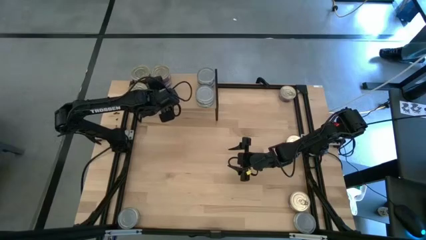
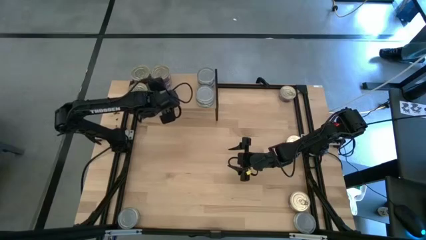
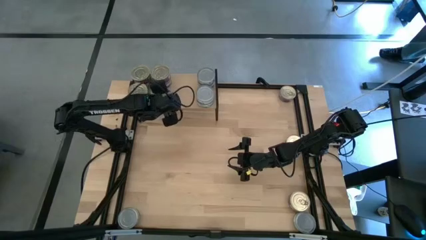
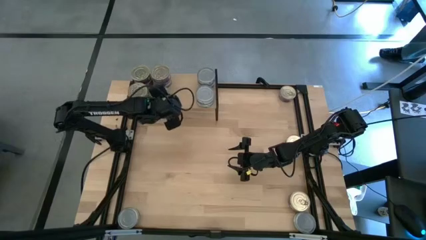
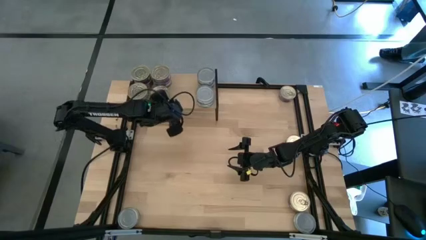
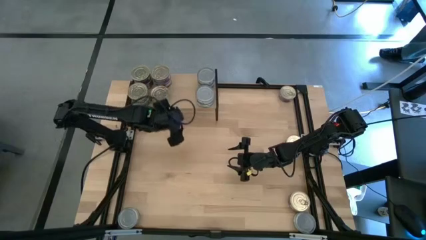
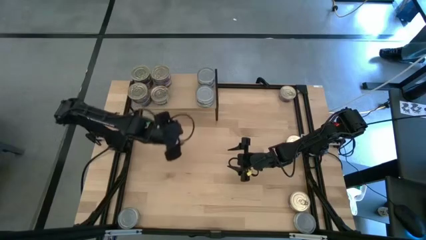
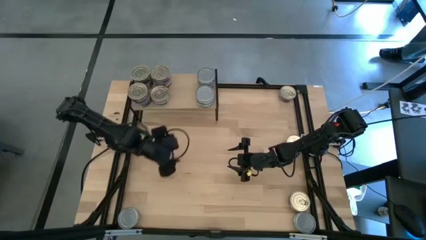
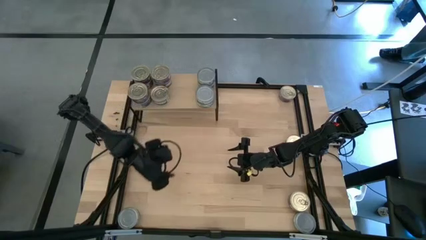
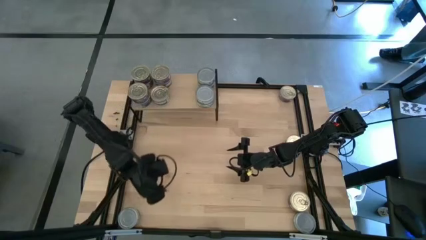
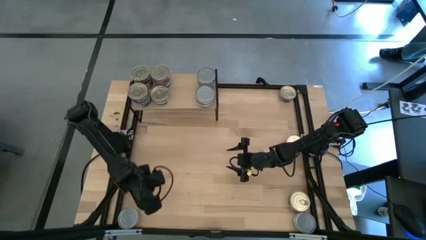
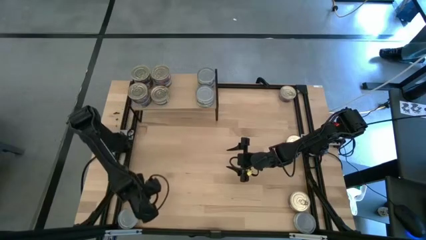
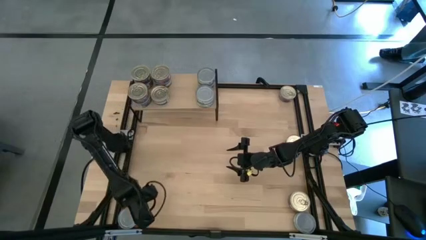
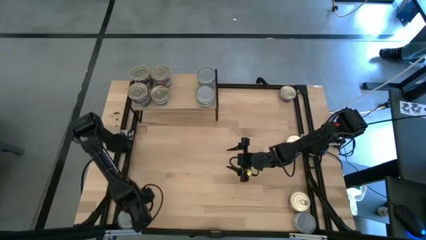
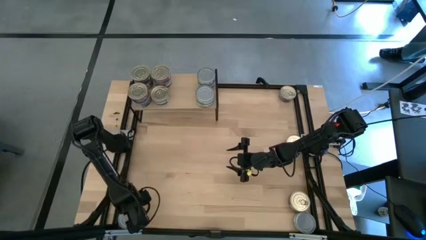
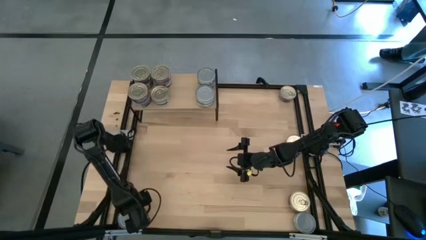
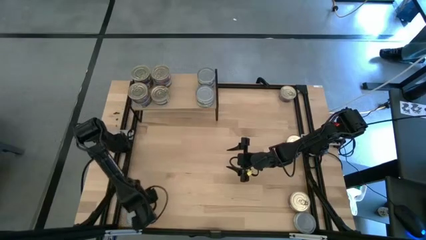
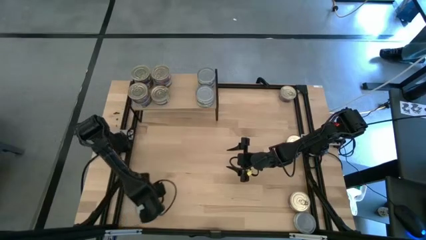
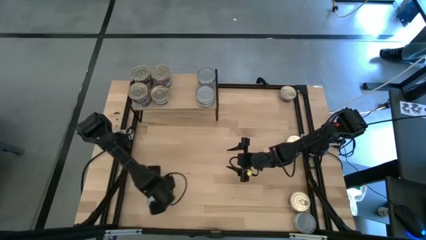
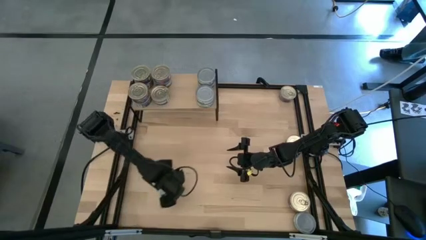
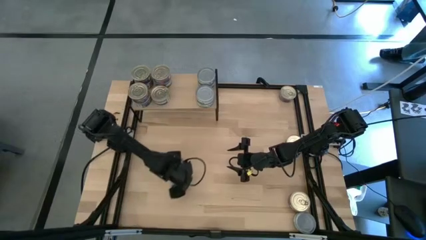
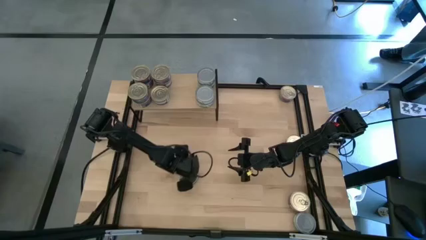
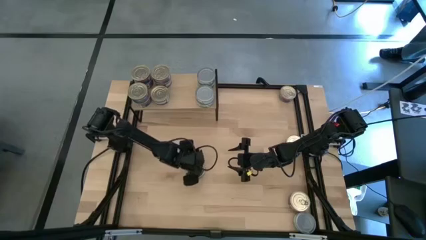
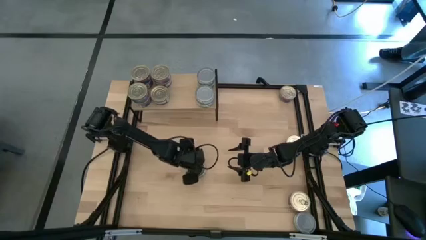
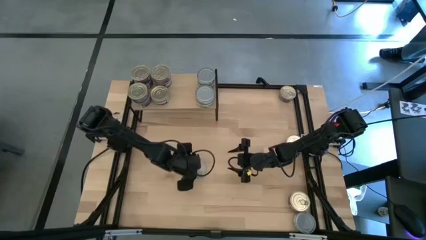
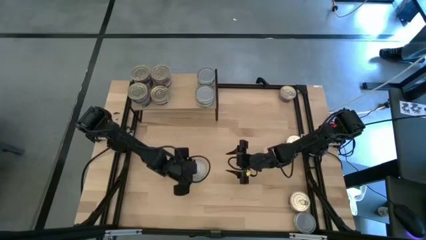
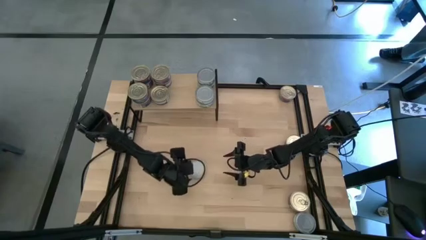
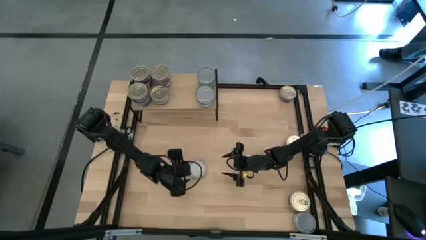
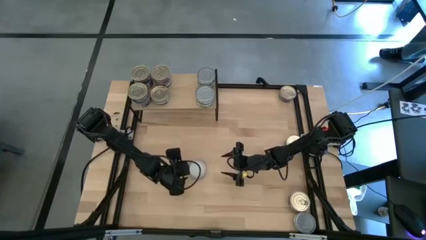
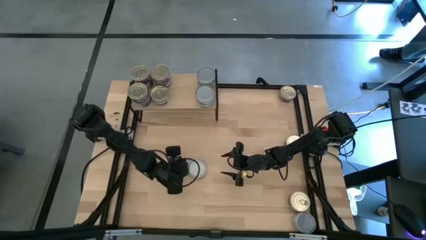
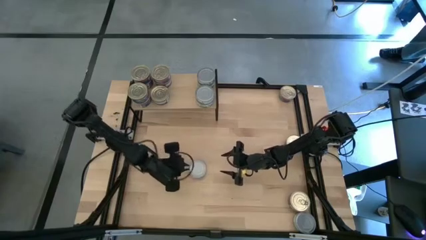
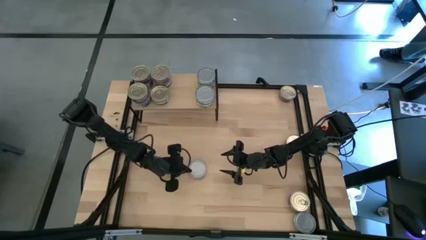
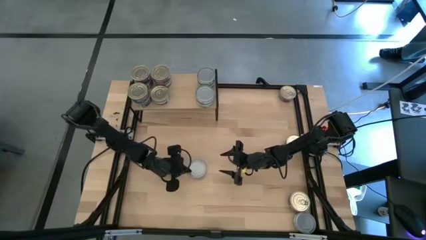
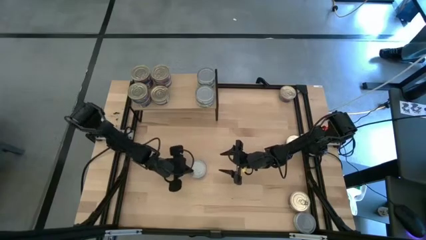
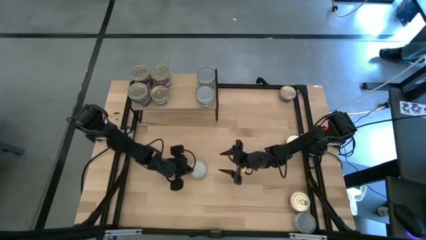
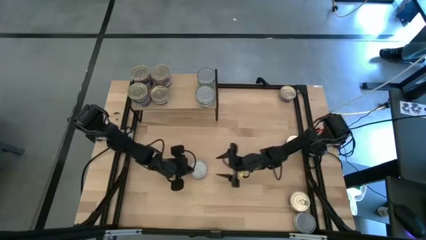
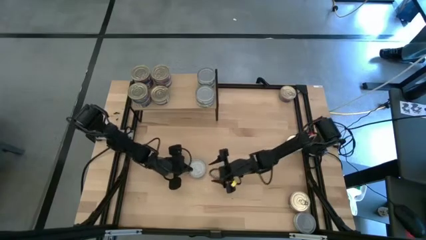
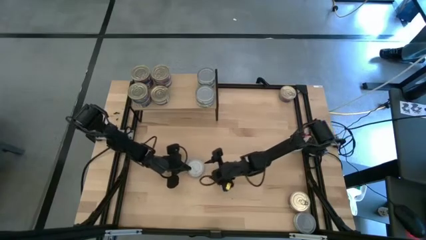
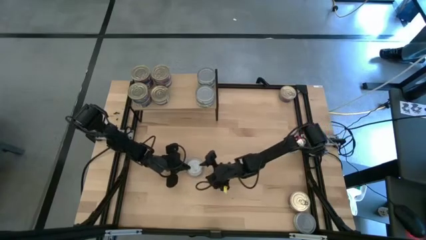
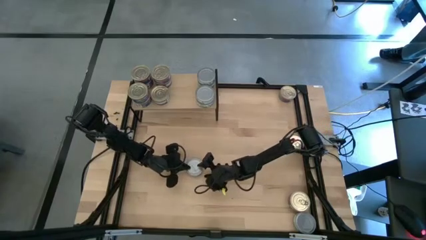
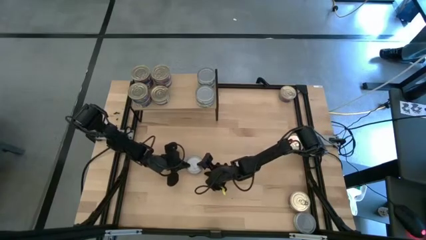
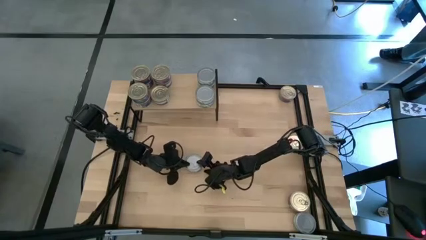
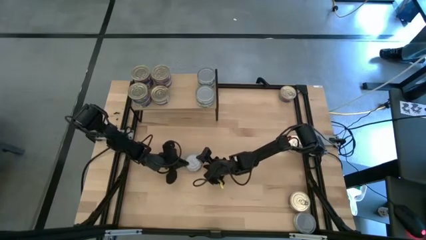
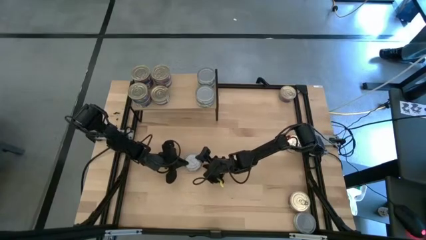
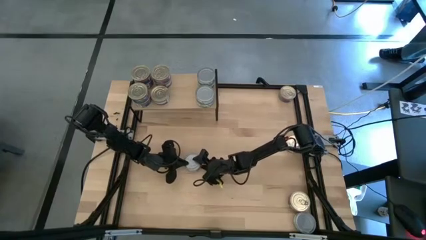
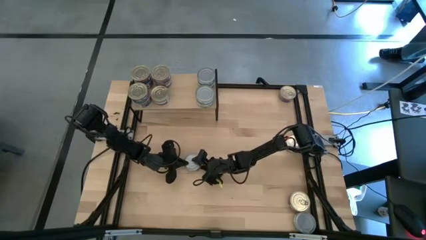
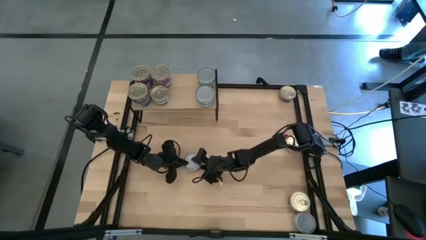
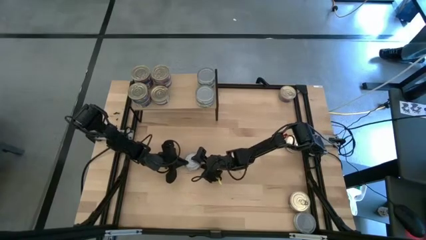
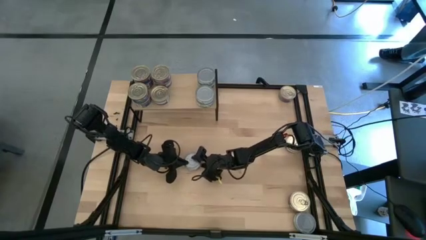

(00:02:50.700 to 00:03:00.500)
Task: Stack canned seafood by type on shelf
Put the green tuna can on the shelf

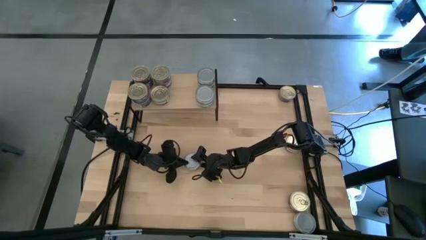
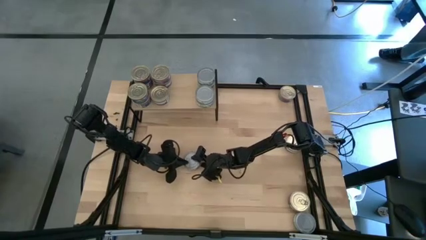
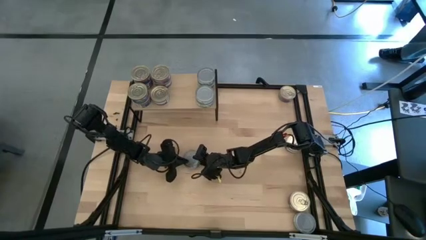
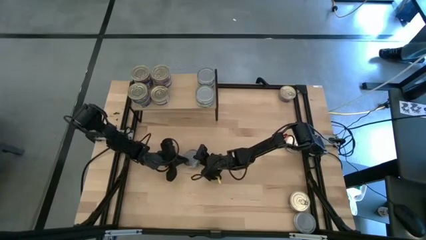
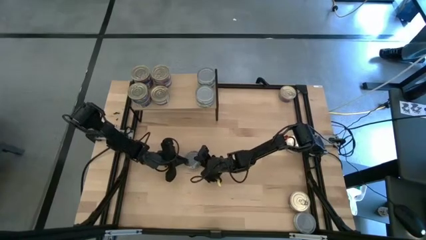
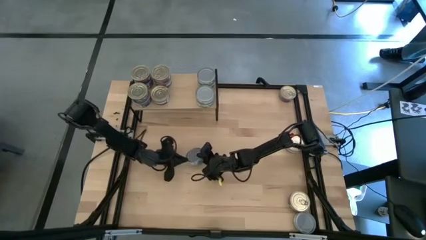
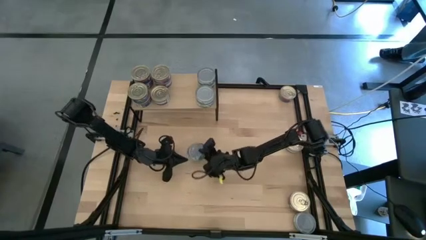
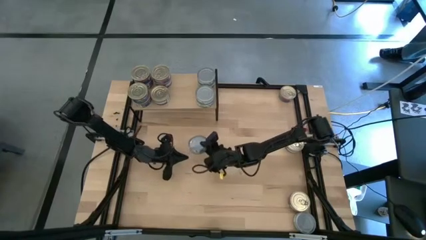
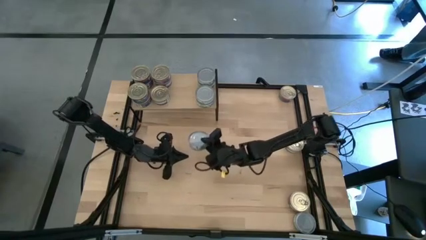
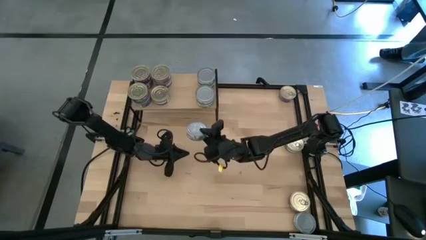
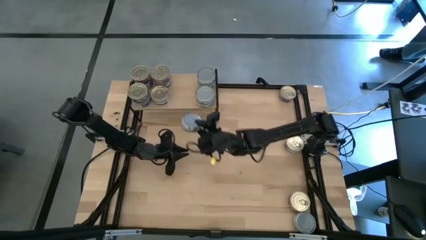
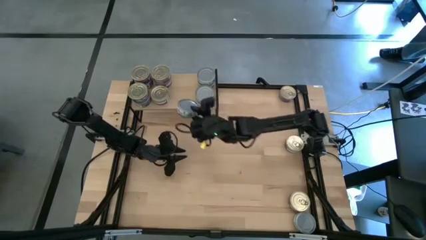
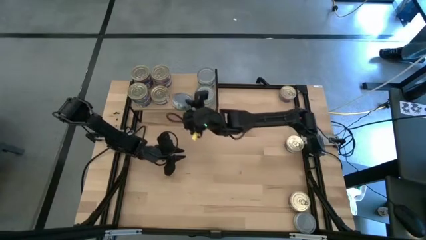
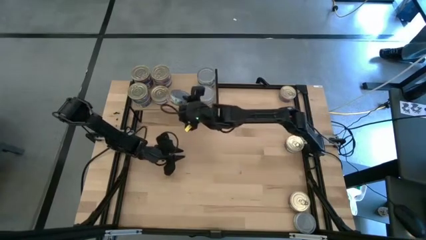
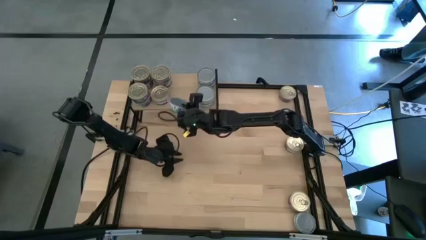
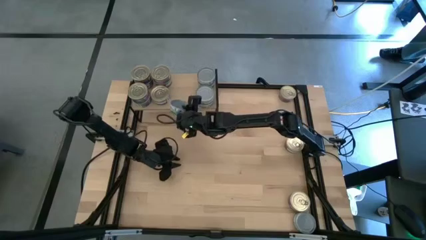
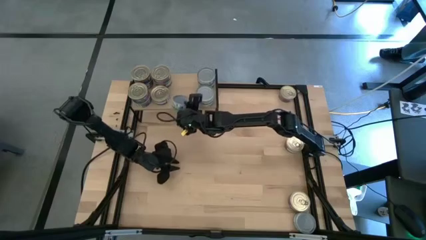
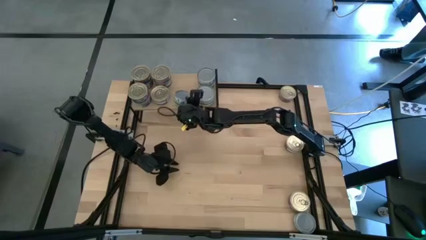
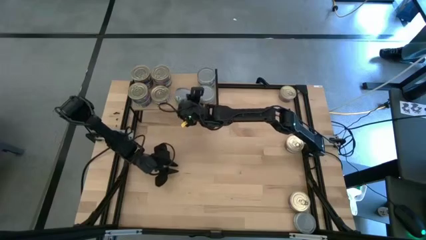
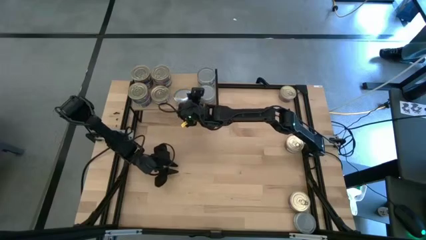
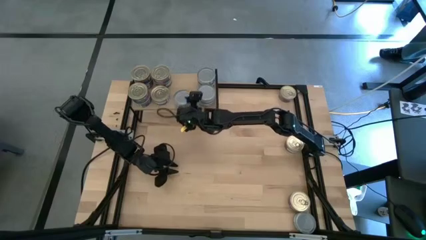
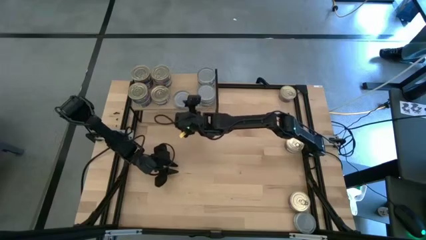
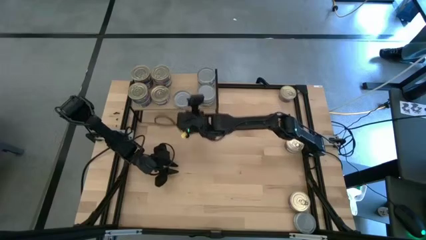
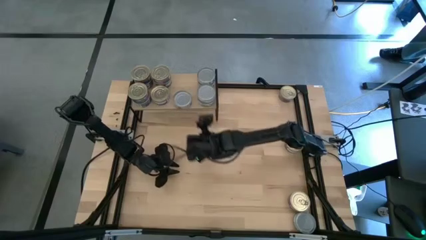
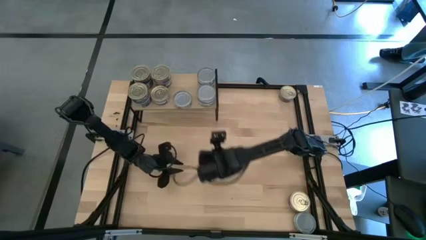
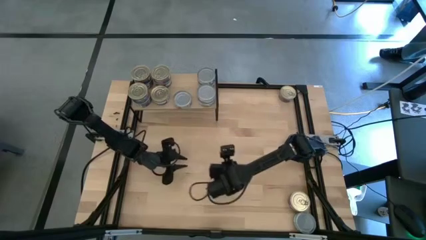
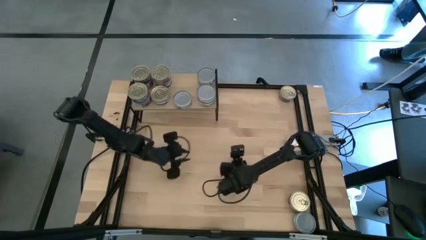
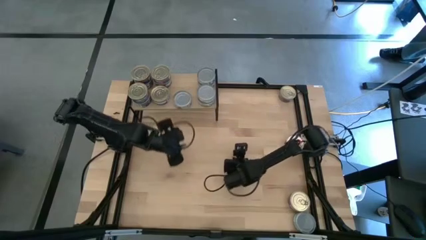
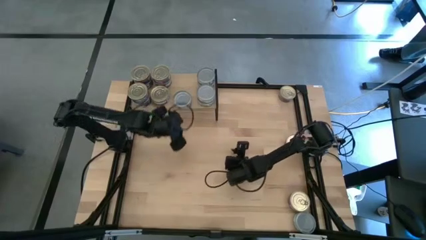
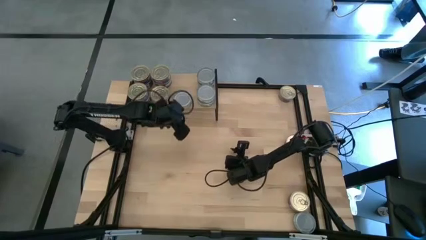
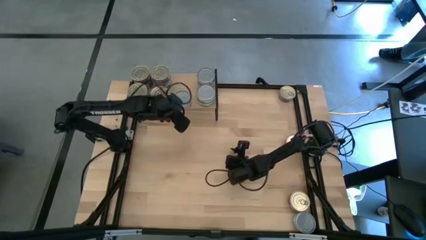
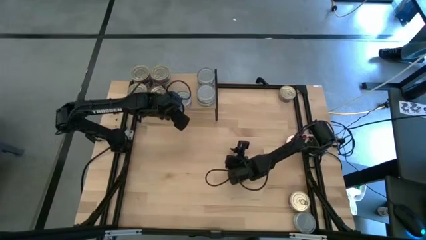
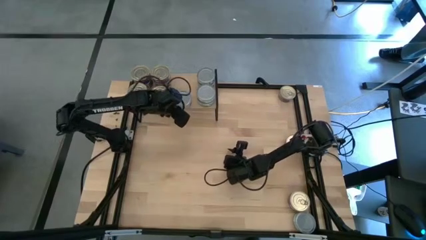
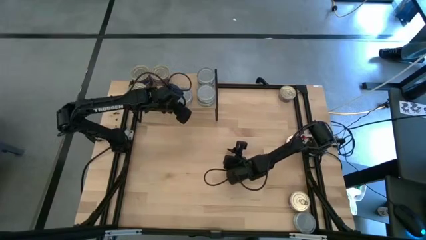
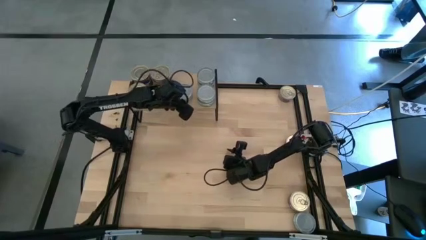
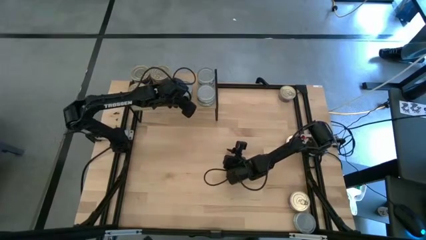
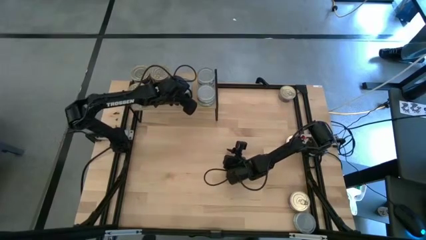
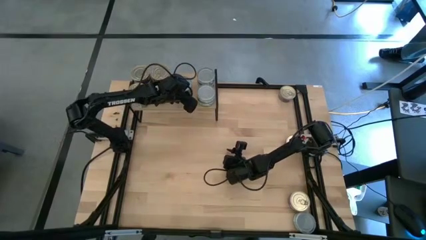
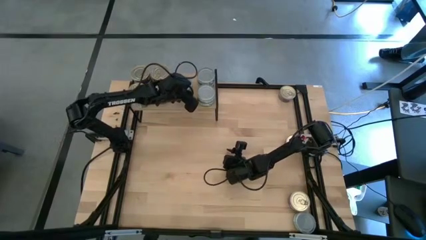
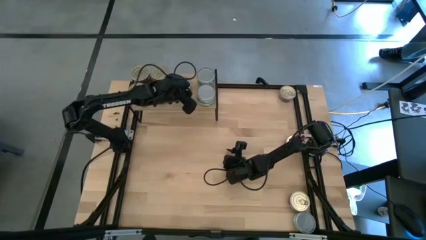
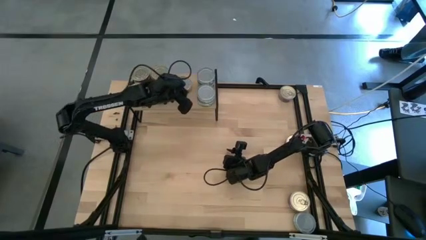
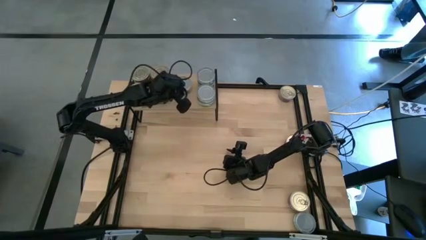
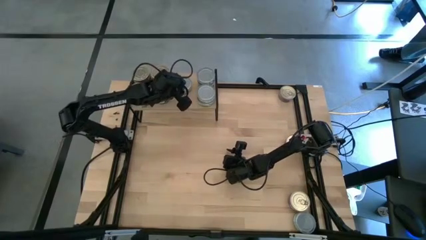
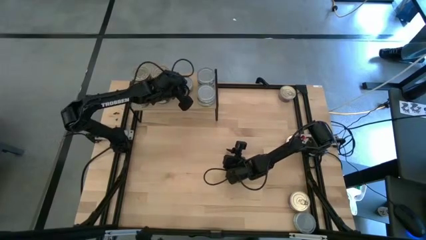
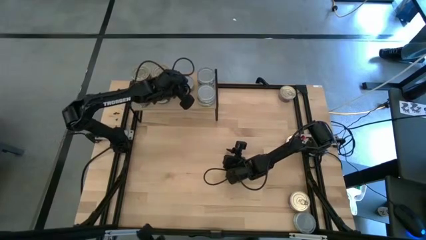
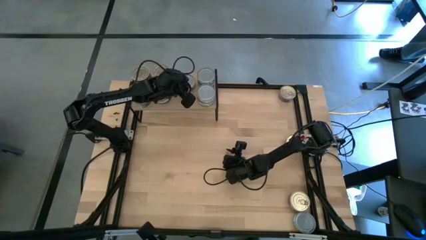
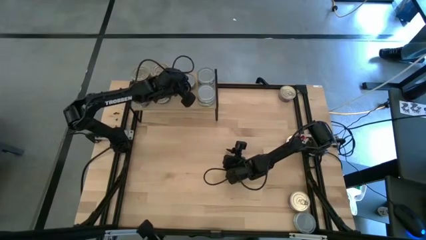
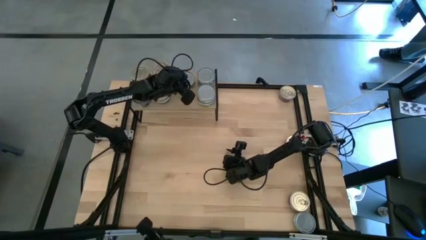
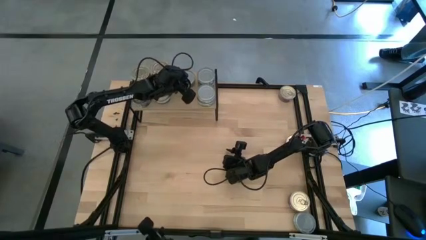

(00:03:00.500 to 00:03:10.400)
Put the green tuna can on the shelf
